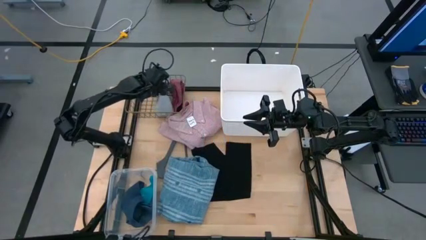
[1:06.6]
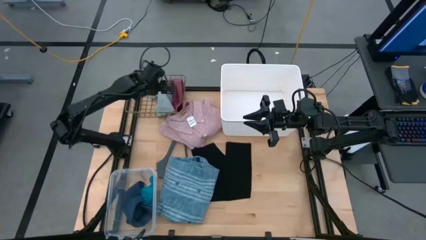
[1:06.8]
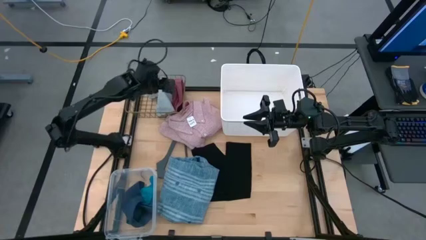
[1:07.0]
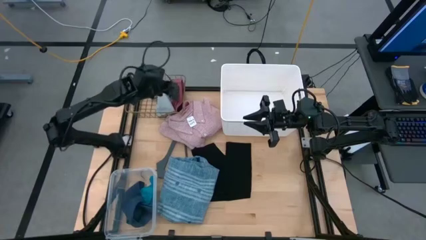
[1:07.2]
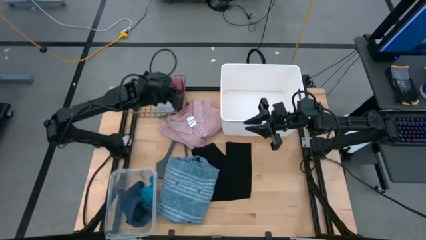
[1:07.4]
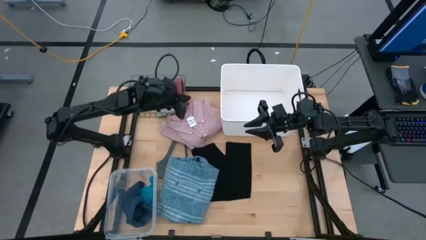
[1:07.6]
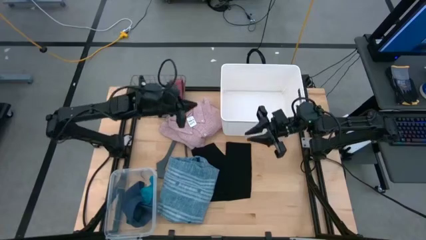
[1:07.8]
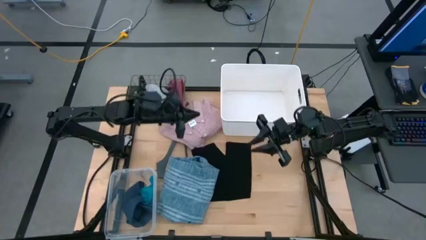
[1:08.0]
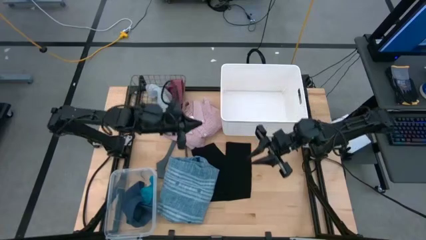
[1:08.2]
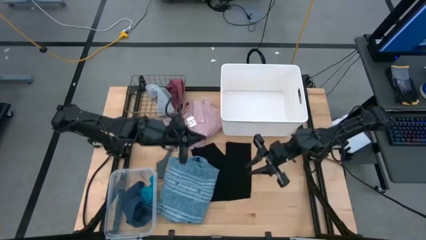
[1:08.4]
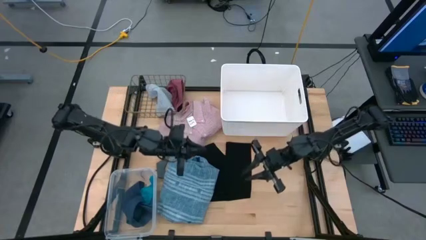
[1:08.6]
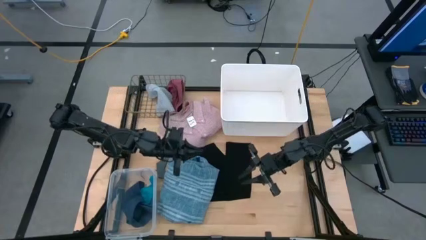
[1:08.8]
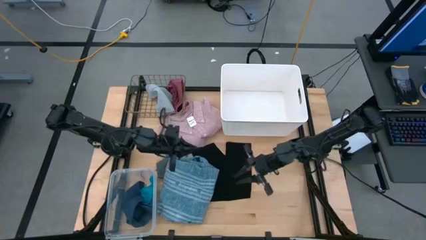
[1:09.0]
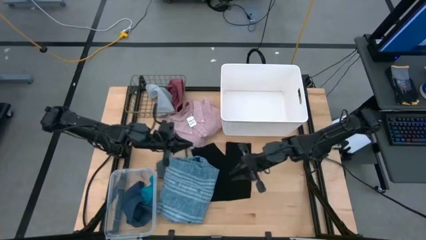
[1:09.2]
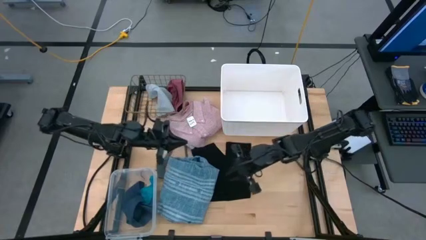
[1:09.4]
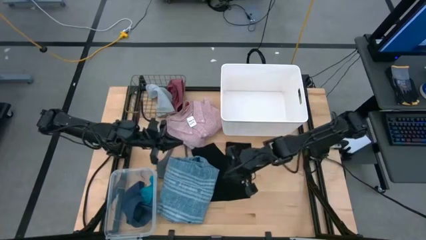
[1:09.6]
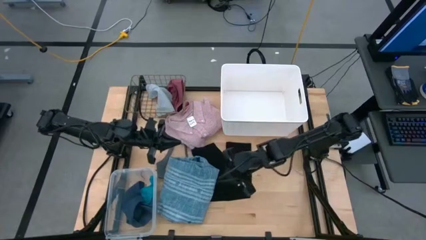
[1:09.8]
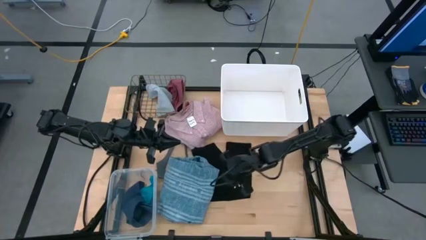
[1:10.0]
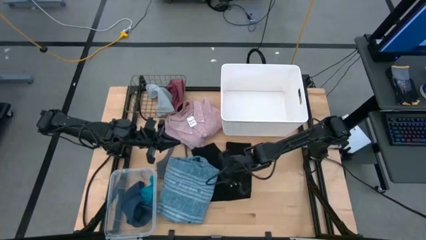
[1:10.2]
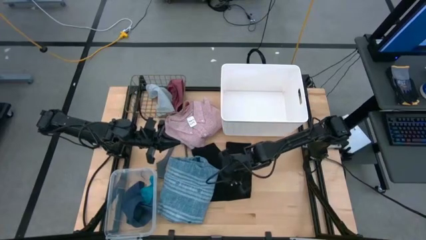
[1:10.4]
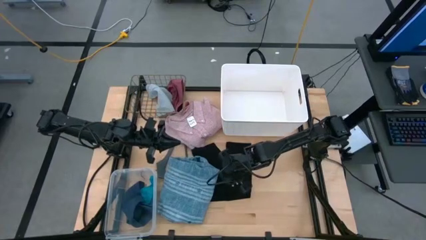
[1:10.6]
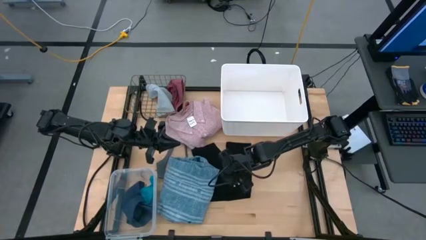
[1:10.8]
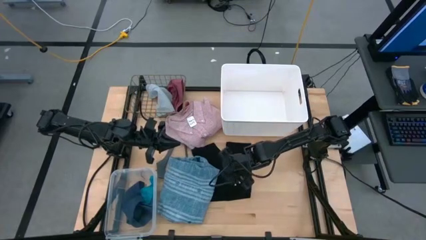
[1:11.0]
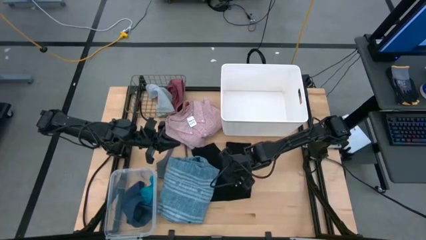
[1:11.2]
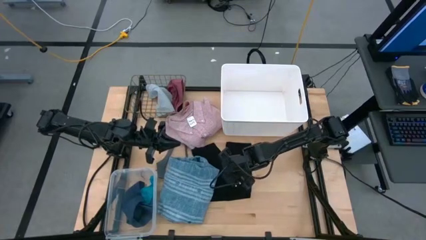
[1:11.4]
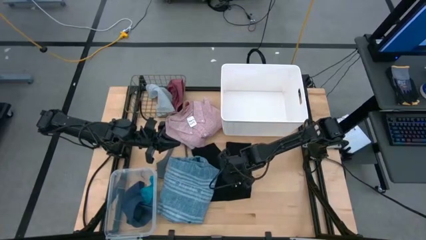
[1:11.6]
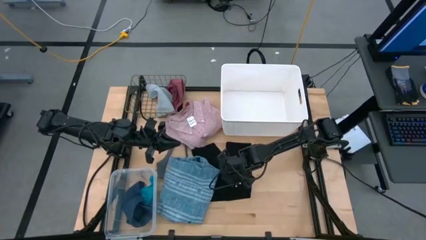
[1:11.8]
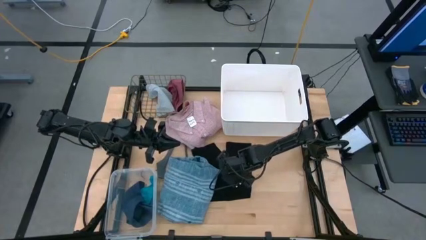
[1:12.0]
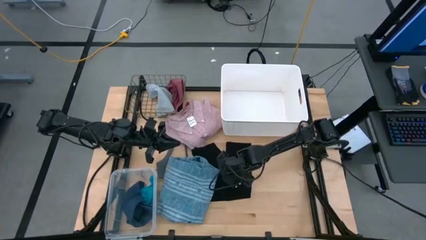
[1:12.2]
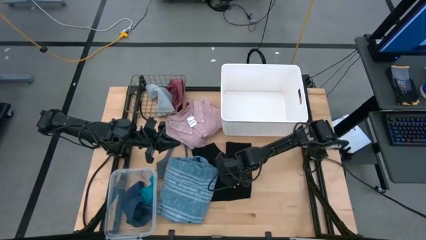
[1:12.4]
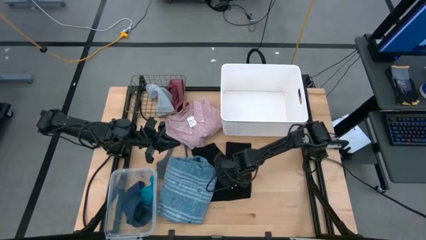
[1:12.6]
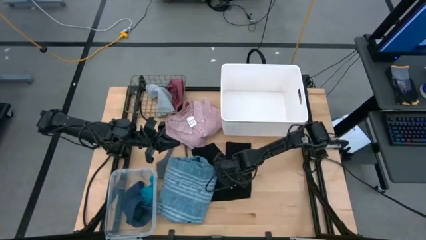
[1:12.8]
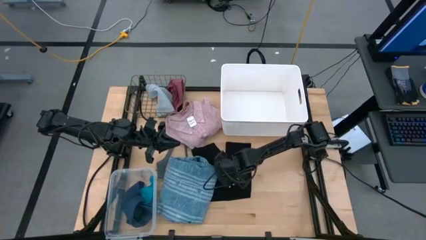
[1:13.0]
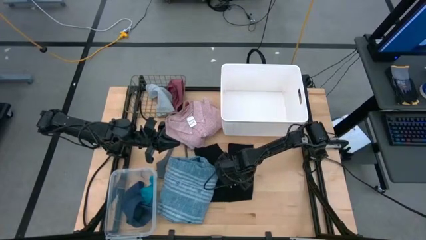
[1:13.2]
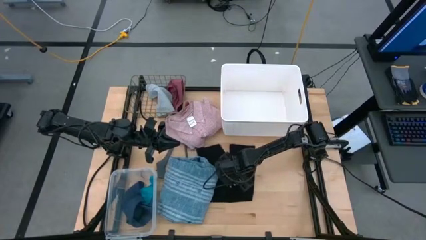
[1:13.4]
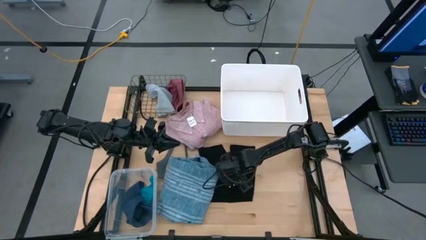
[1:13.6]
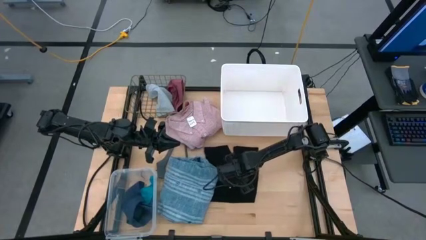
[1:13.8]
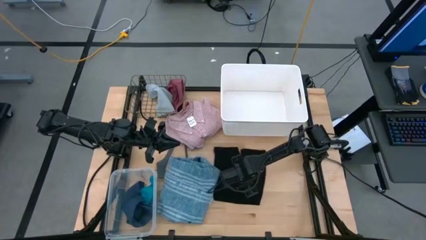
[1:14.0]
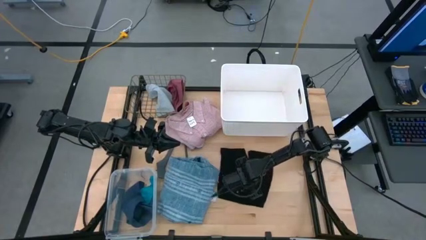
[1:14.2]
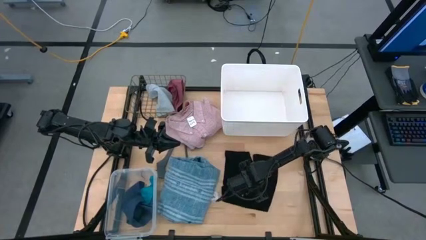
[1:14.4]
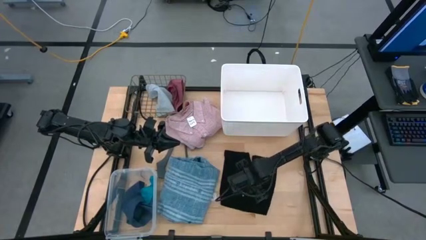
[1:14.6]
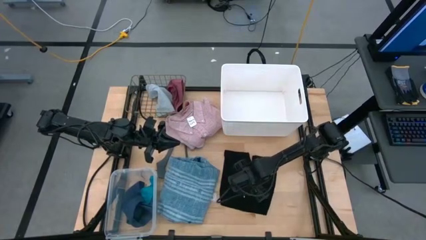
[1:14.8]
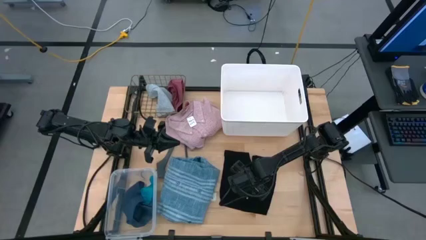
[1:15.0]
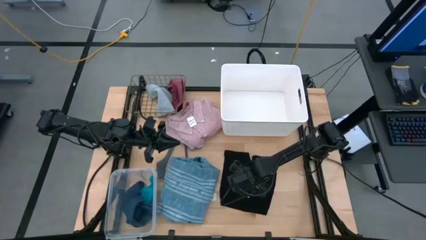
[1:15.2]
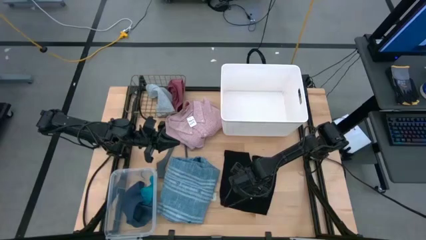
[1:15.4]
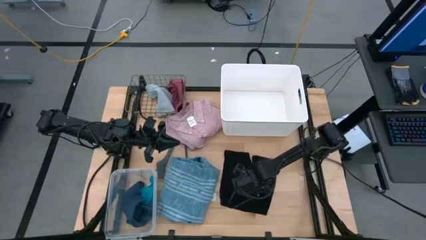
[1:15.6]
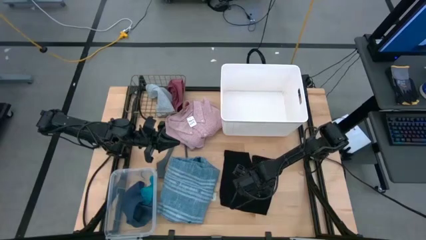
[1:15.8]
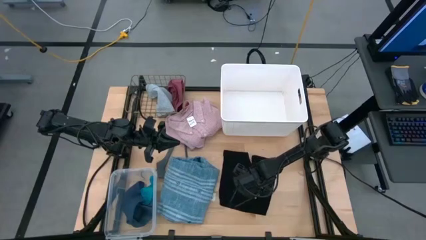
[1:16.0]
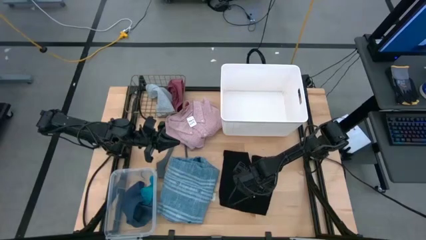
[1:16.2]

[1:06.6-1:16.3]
Task: Pick & Place Cloths
Put the black underwear into the gold wire basket

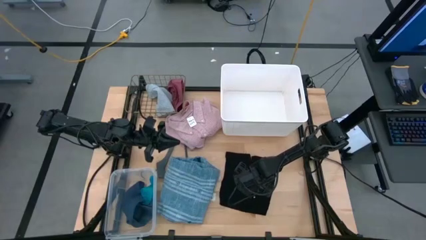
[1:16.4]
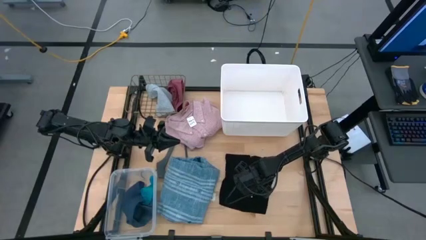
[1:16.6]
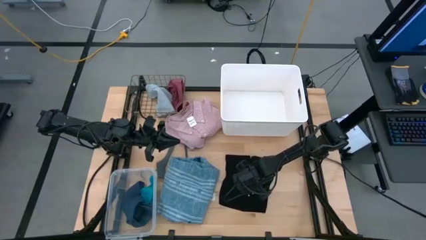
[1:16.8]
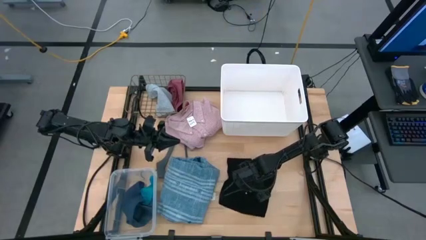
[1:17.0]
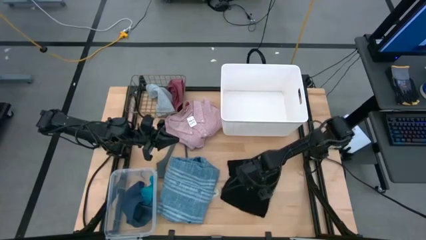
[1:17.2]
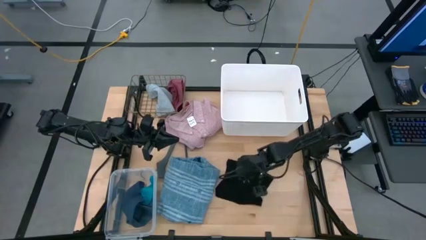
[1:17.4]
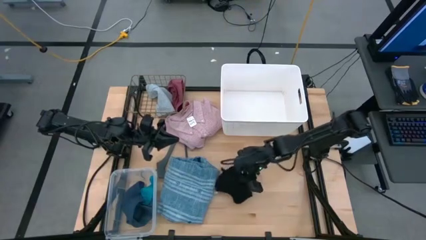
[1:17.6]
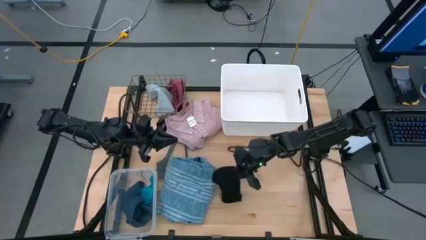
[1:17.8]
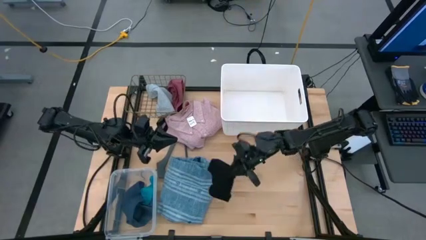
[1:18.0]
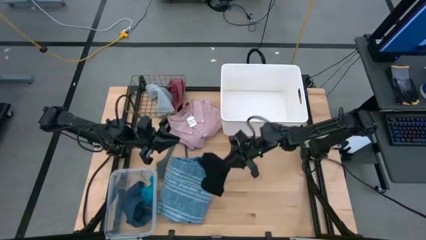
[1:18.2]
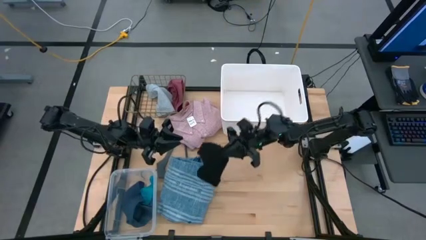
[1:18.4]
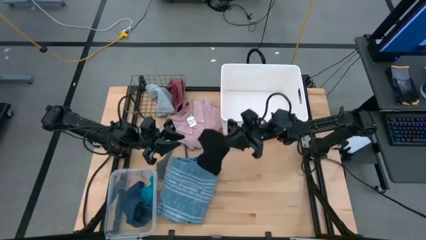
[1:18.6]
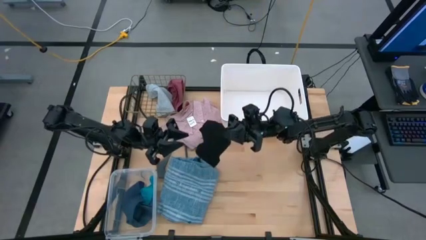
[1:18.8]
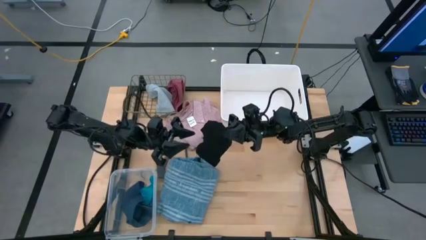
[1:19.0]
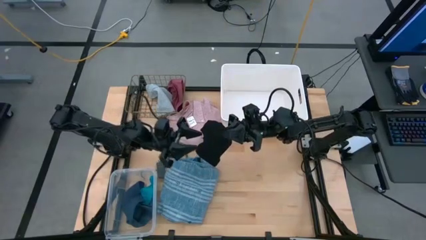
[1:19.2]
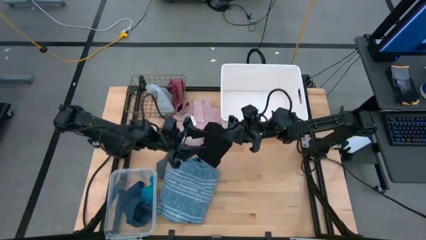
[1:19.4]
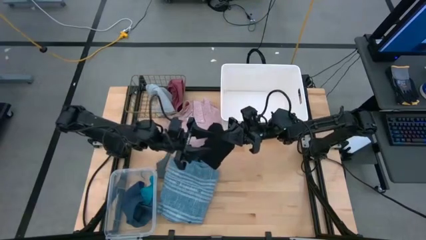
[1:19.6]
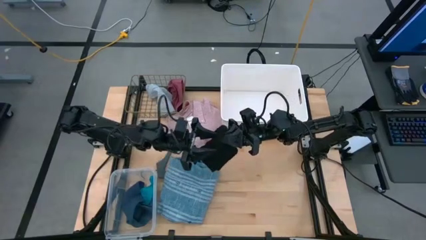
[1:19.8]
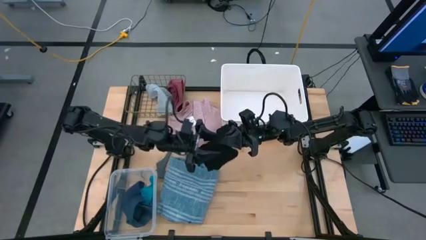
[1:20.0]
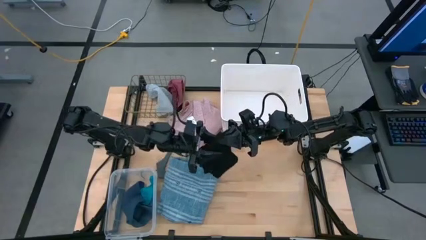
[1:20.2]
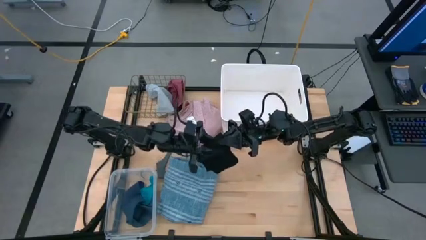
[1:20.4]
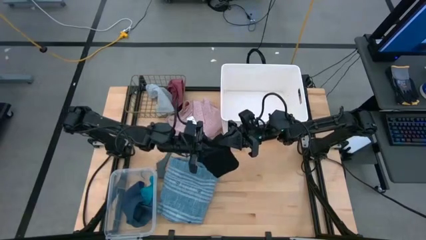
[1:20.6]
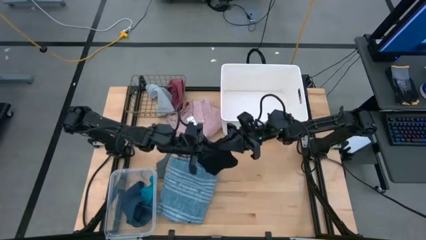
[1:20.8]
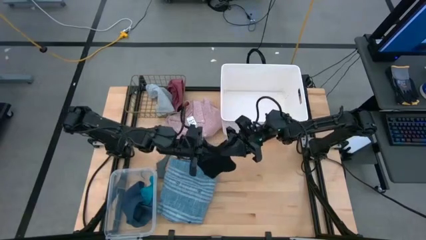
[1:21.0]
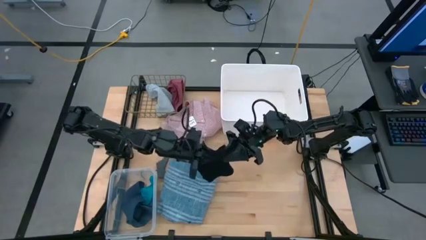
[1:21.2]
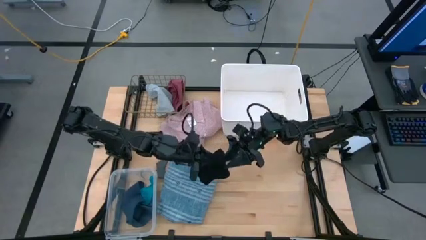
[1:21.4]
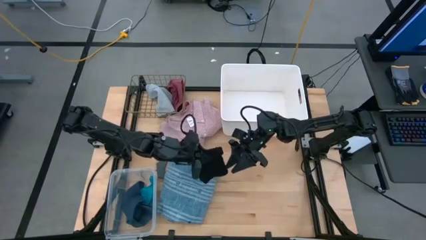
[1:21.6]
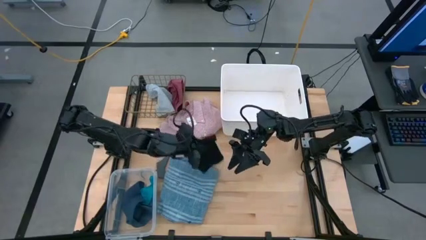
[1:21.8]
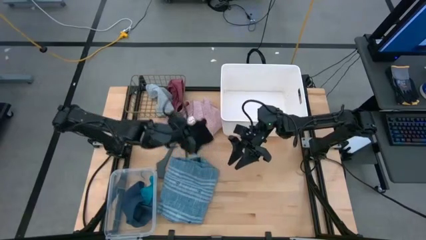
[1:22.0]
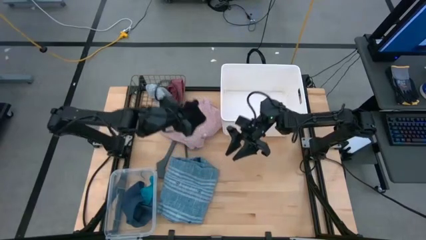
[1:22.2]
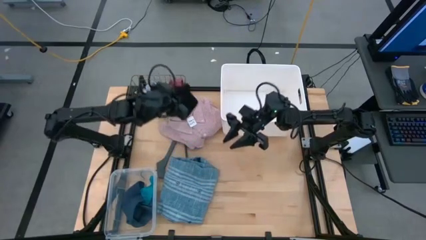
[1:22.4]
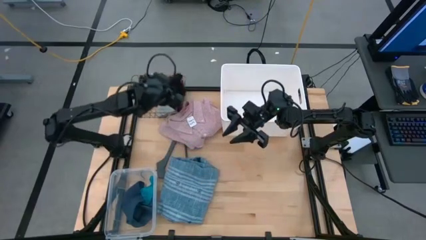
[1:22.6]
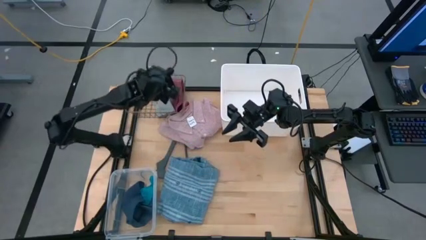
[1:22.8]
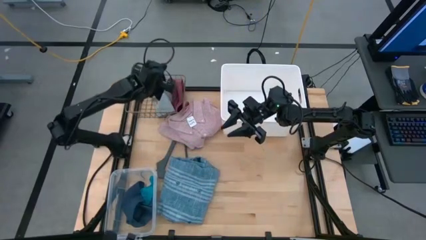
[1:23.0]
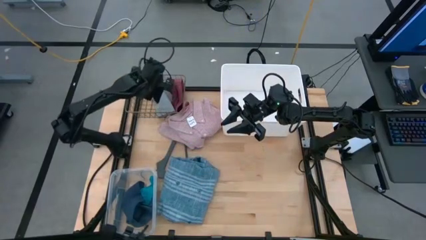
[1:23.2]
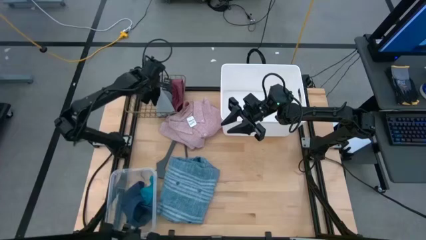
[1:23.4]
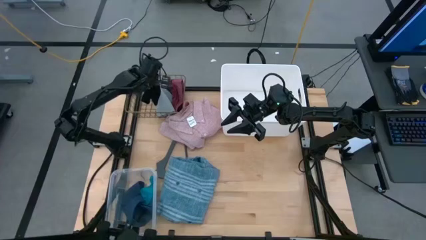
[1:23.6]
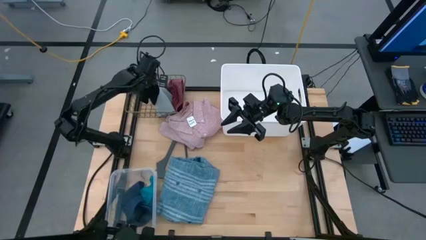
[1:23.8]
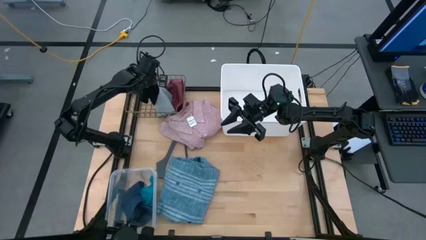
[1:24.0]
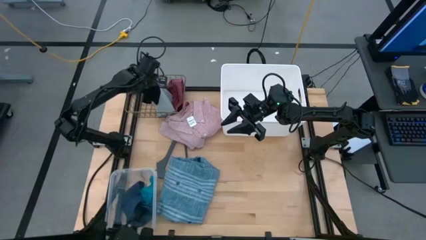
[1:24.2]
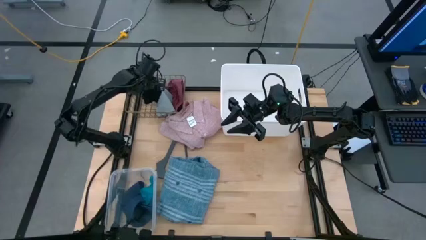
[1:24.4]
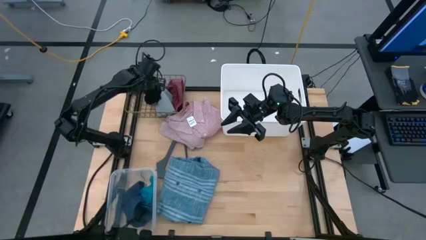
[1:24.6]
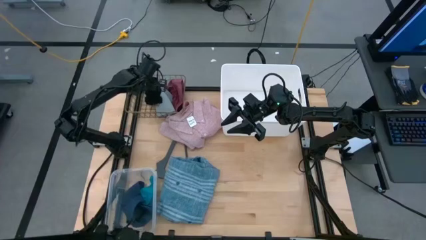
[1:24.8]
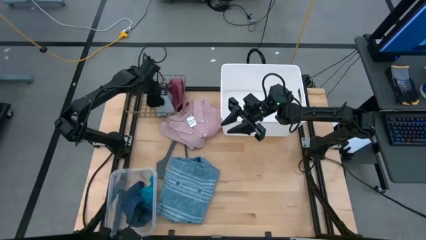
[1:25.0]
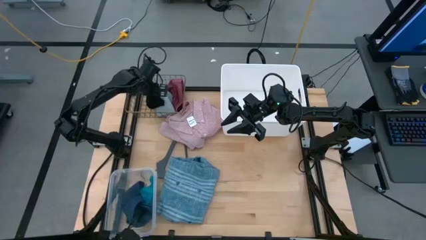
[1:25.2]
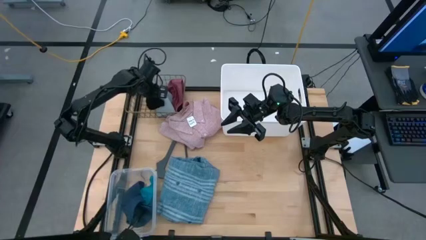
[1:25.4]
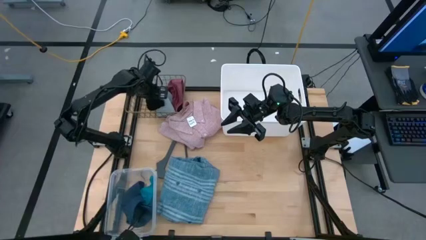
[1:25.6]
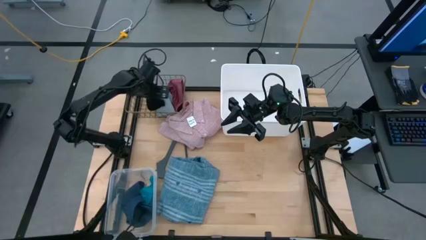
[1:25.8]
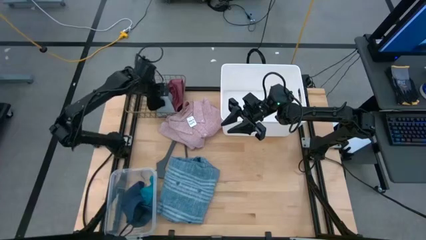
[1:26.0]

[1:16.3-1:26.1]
Put the black underwear into the gold wire basket
